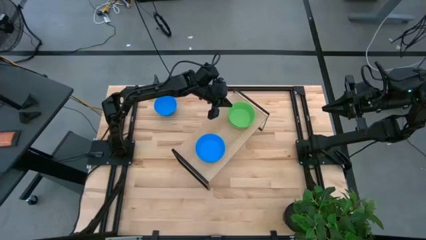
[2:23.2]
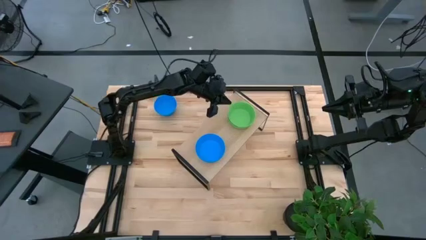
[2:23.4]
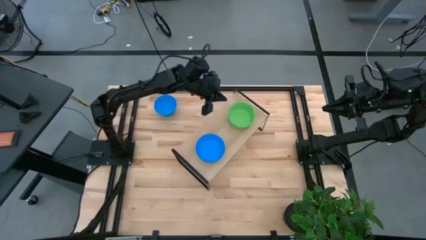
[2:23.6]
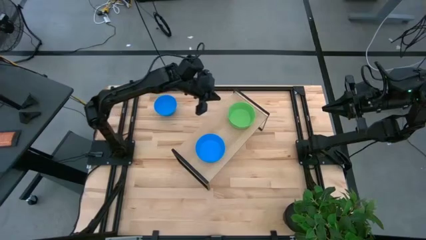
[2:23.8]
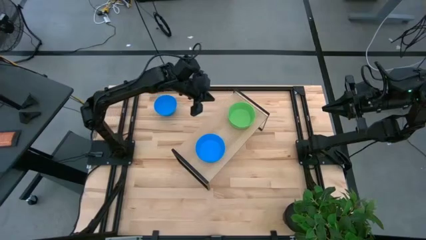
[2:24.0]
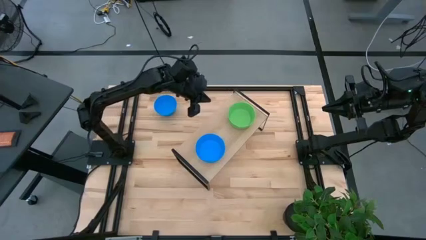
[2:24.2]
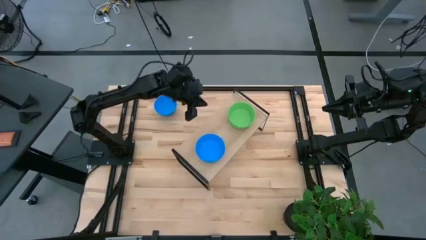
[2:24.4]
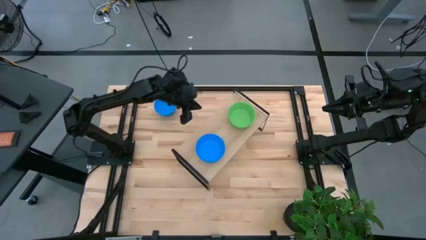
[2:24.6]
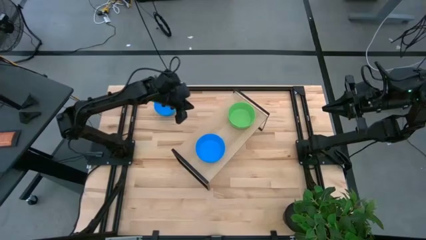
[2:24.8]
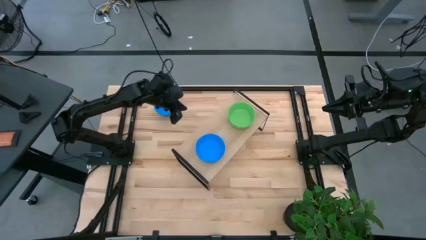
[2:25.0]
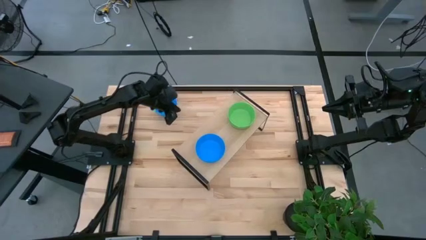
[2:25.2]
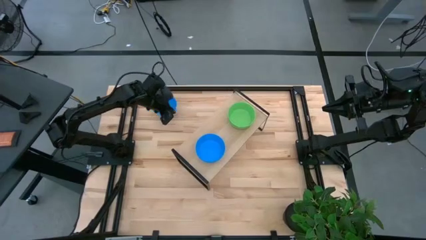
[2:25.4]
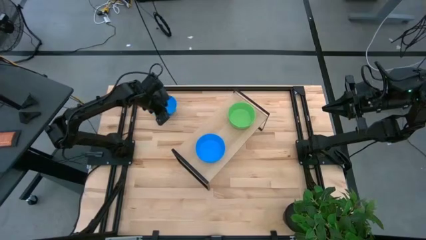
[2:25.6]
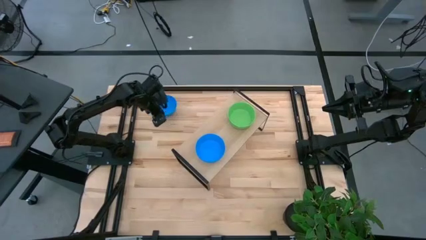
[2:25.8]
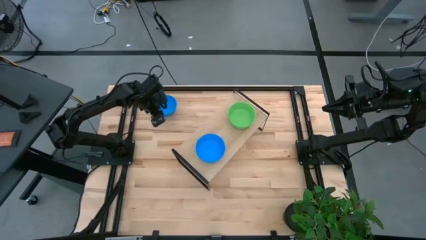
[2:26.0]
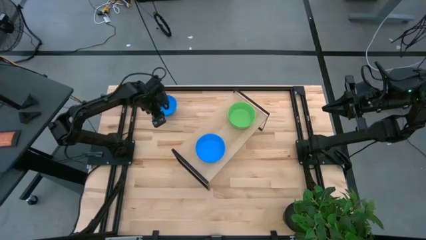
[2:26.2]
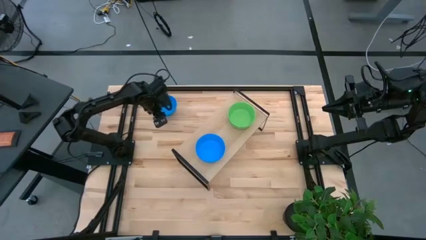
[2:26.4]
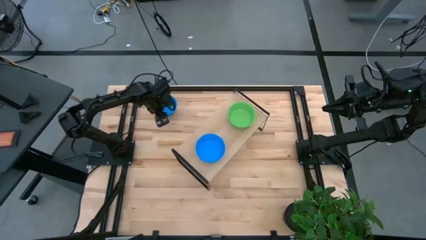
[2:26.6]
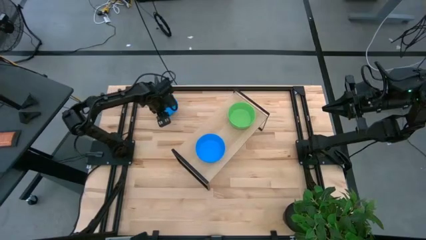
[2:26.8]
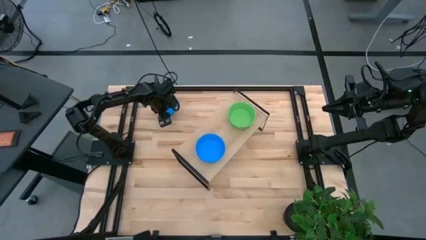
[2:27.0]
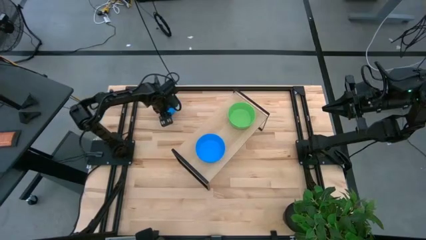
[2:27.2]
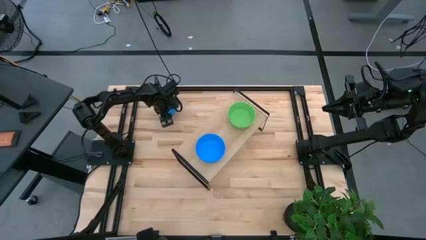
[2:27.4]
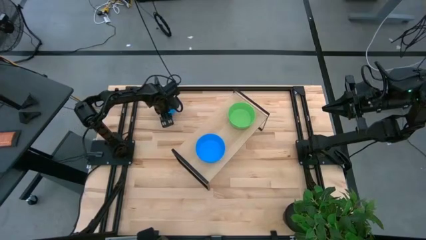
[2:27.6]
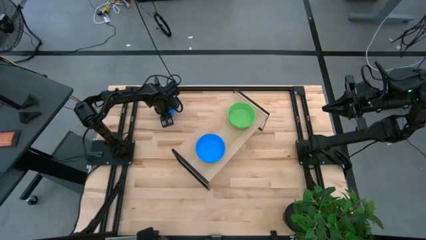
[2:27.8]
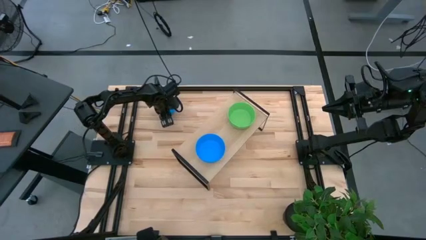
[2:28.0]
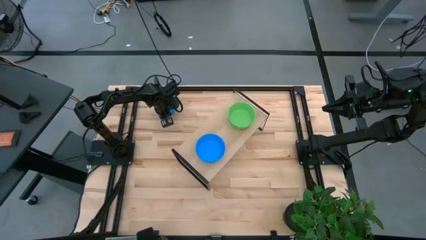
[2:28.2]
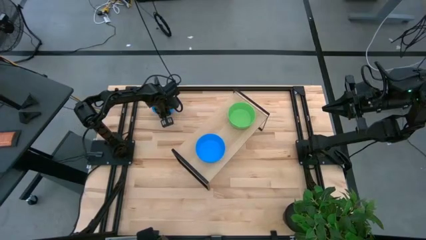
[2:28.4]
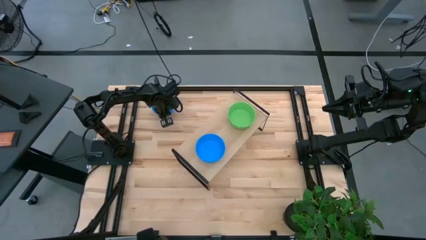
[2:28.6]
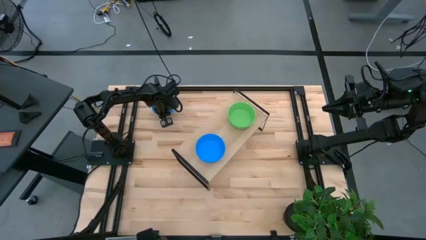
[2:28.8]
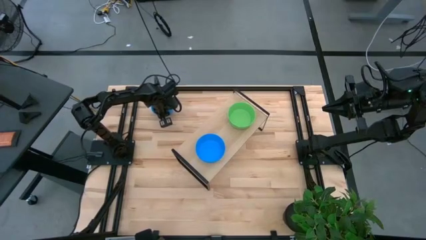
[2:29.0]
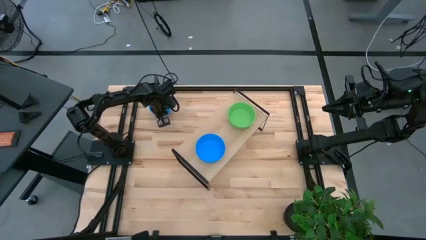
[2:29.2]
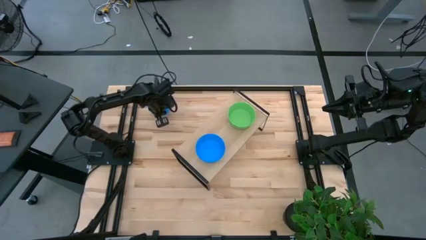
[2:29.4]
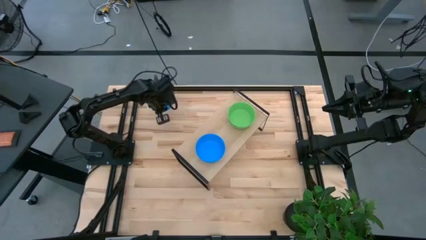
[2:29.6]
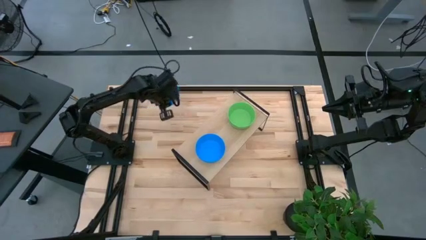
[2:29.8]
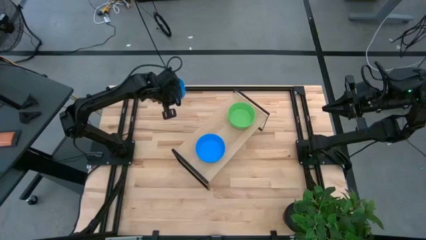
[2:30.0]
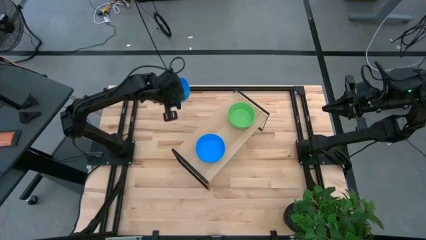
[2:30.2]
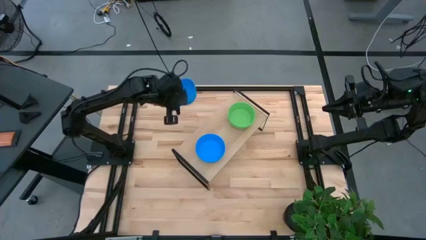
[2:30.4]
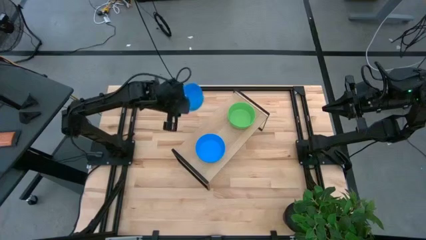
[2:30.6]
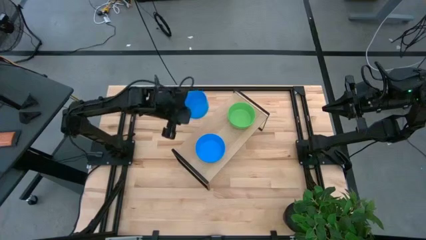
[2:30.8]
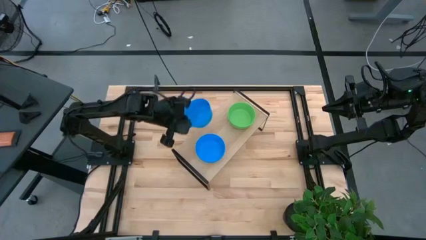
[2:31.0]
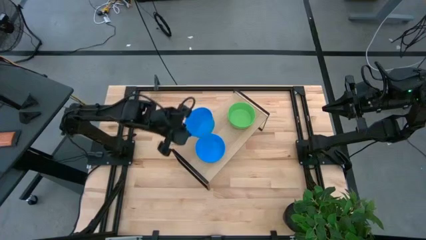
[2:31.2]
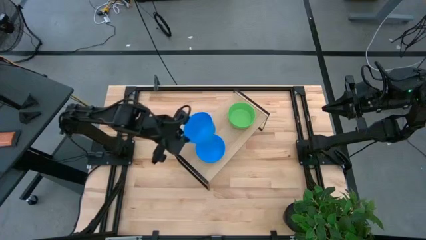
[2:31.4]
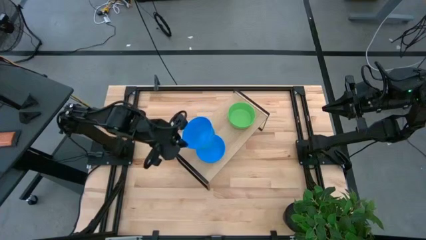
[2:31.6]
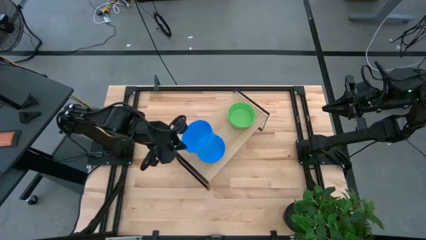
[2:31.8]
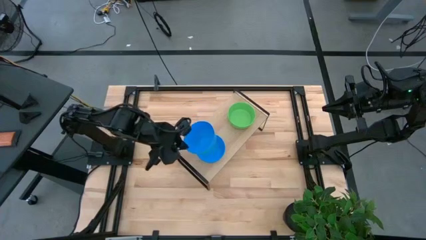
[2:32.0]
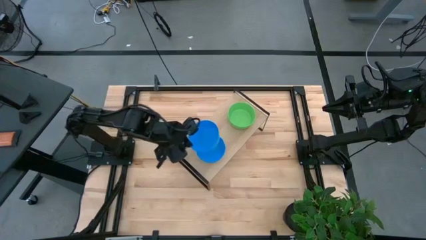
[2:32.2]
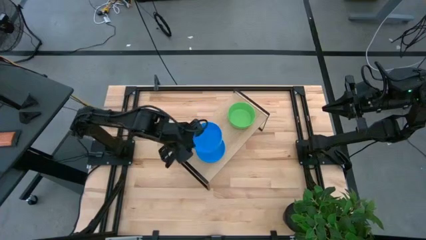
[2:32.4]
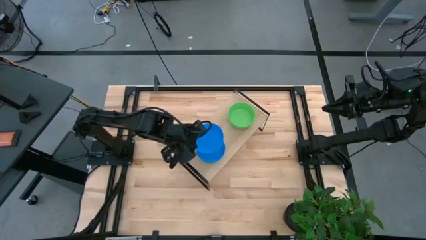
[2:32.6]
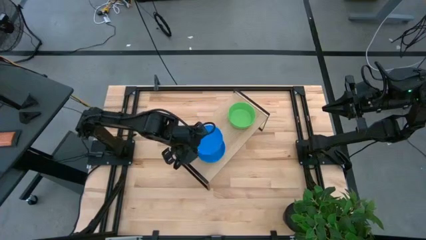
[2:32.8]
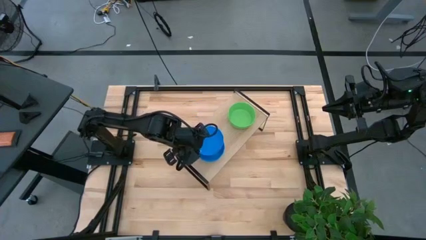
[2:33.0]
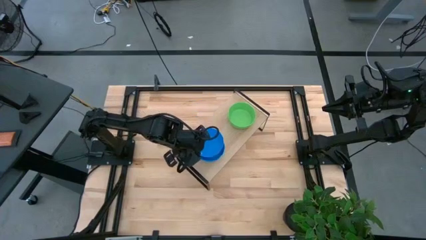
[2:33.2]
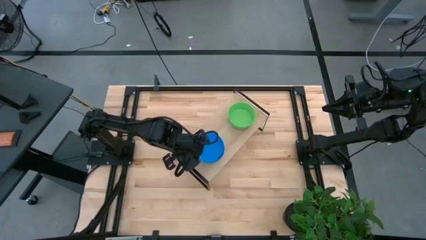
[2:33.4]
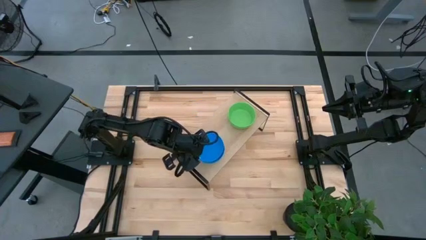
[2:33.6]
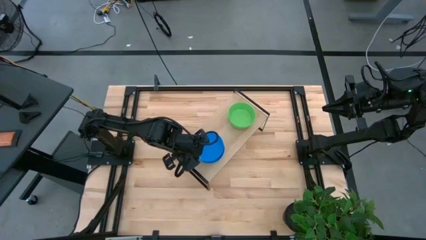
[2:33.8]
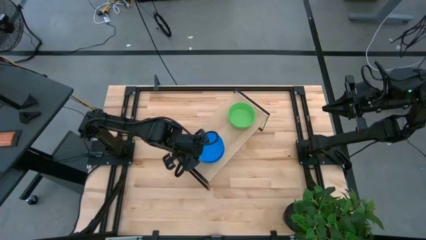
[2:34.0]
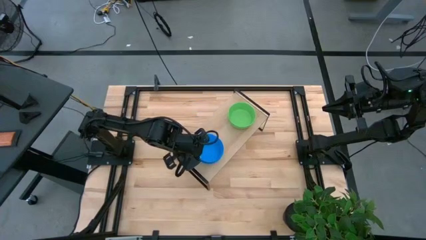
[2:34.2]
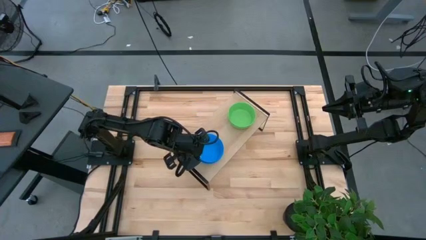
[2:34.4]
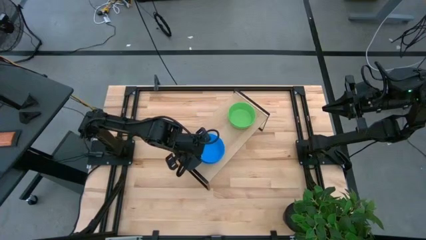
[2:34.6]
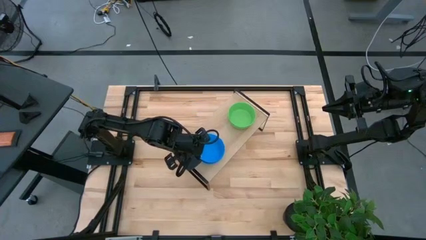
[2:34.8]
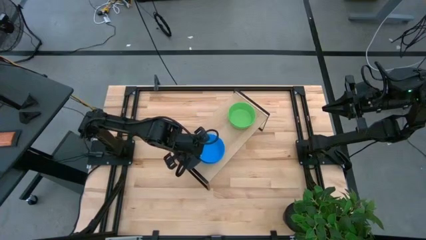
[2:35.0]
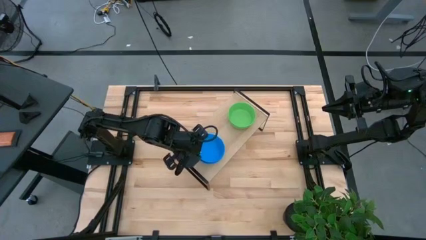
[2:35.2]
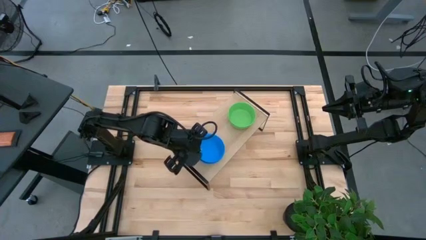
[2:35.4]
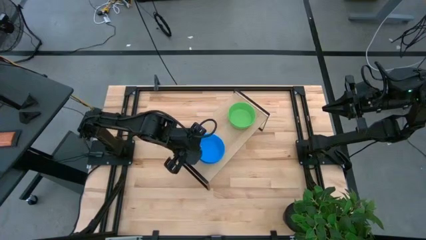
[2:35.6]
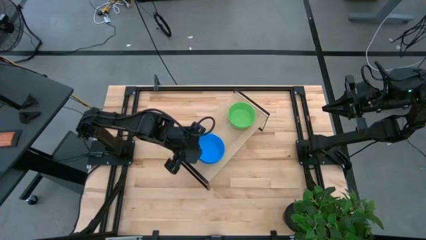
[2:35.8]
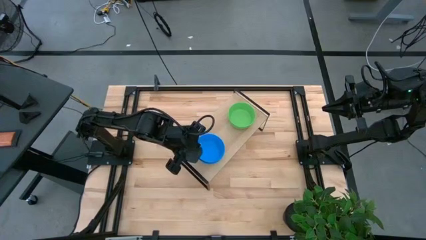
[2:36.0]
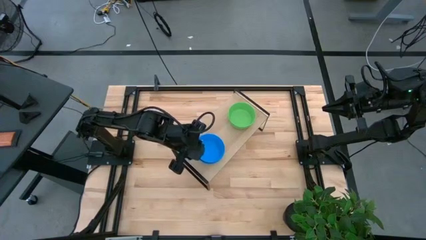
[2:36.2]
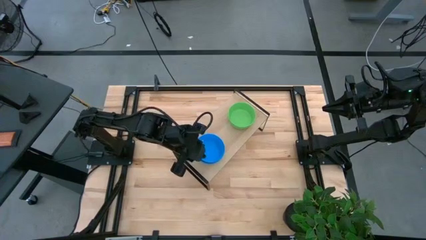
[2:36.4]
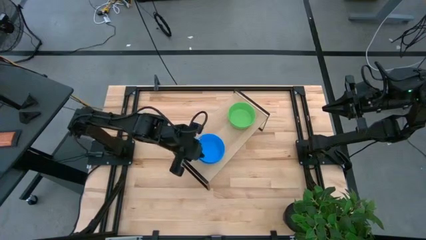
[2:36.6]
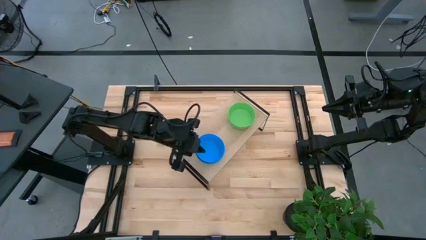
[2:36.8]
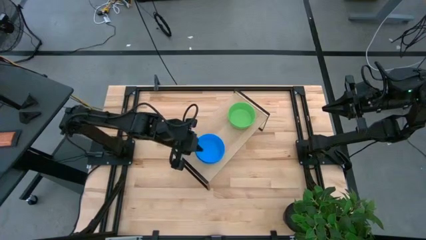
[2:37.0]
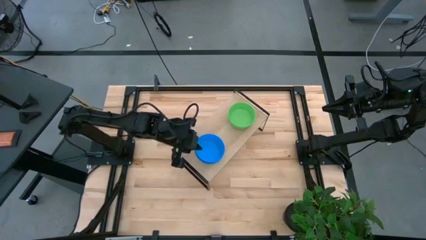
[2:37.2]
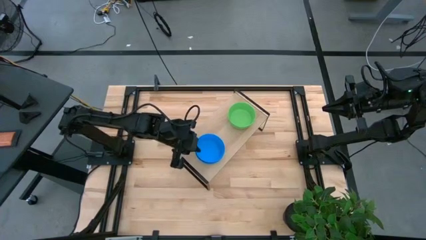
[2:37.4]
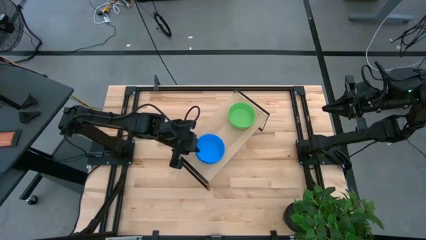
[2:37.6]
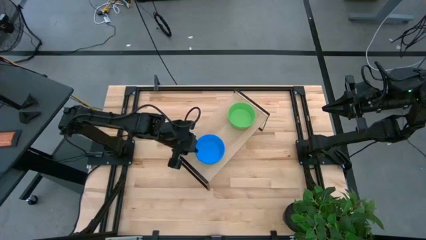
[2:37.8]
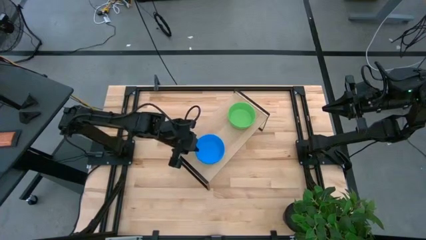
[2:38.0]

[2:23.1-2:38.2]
Task: Pick & Place Mini bowls
Stack the blue bowl on top of the blue bowl on the shelf

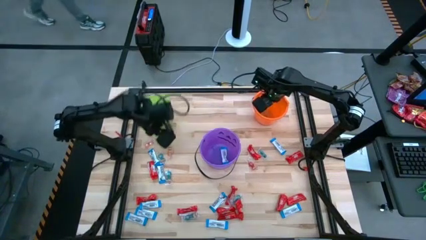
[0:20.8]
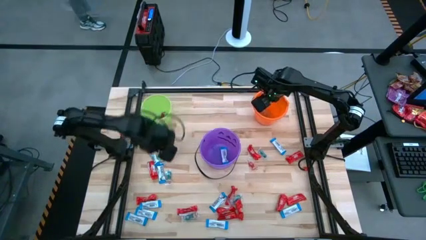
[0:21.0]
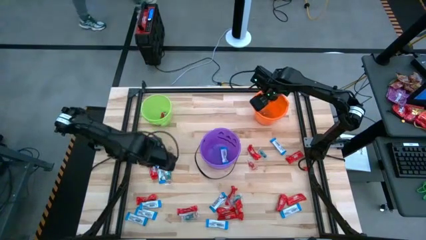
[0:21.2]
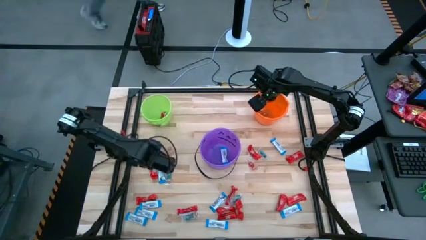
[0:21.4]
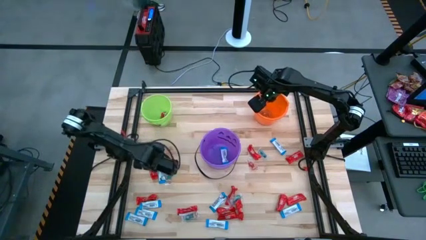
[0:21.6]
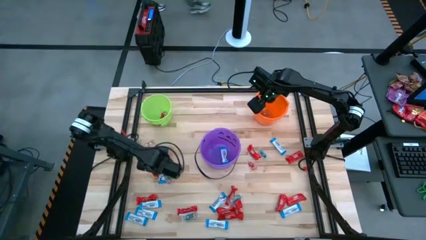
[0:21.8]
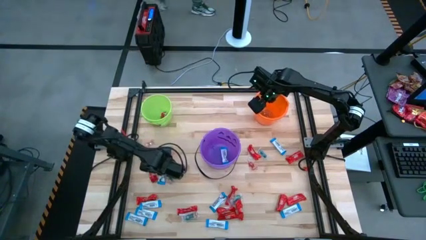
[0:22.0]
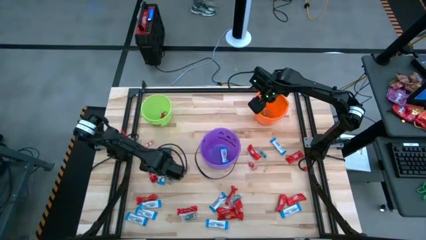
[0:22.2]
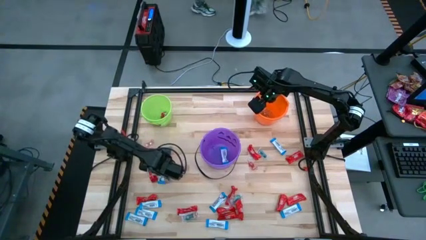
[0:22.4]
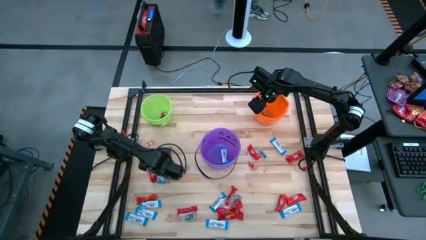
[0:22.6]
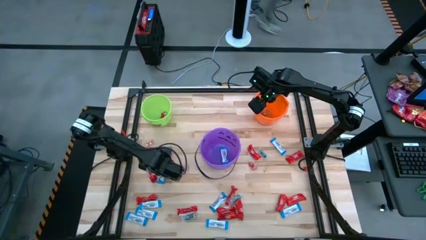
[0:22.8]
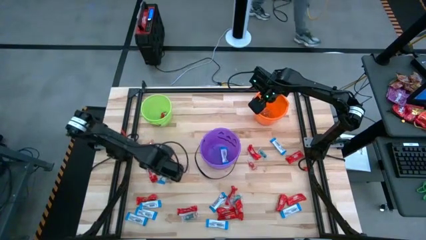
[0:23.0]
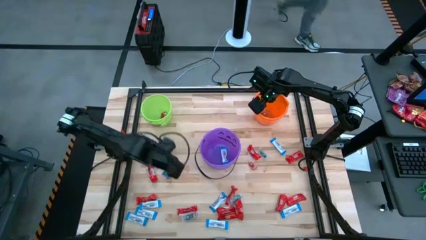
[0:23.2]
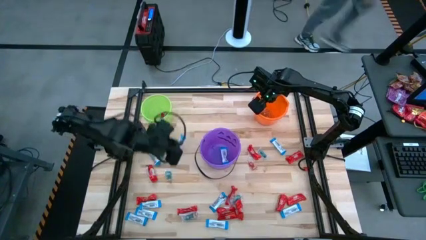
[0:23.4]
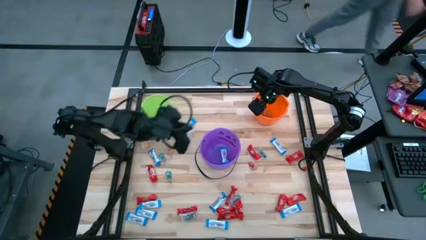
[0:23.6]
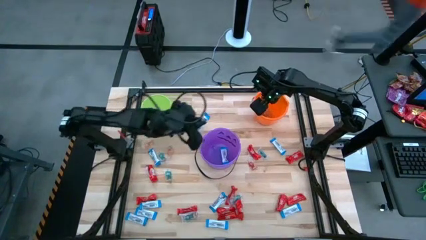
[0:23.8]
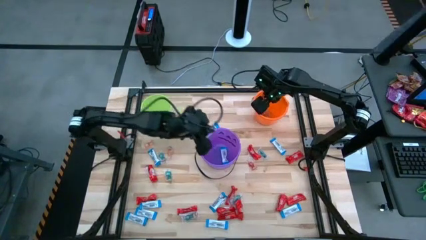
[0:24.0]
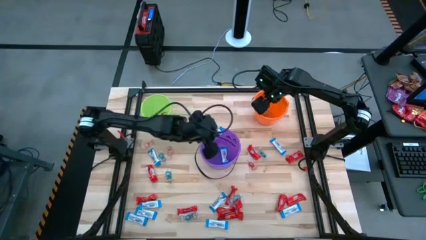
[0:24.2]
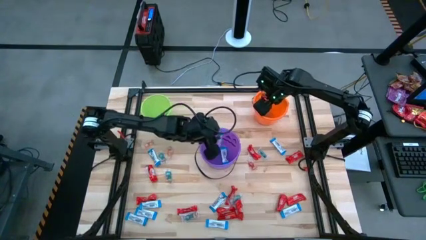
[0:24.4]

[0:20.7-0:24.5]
Task: Sort candy by brand, put in halloween buckets
Put the white chocolate into the purple bucket
